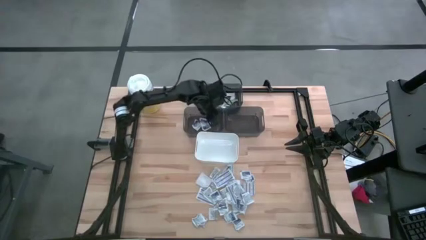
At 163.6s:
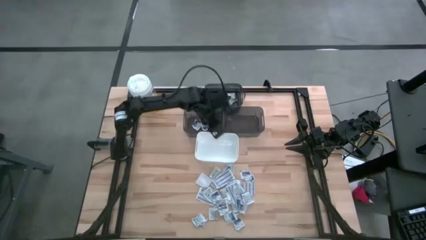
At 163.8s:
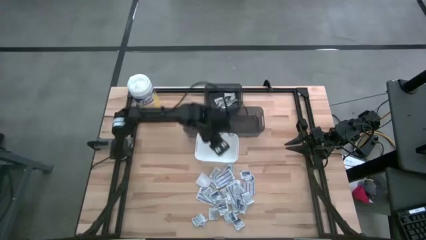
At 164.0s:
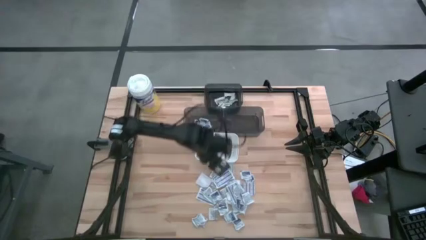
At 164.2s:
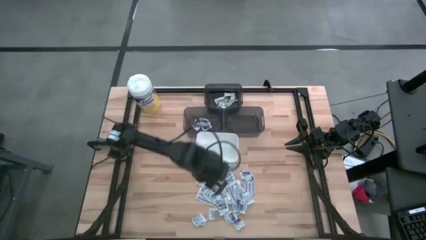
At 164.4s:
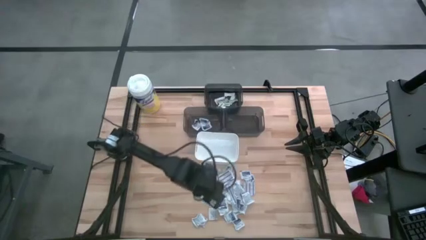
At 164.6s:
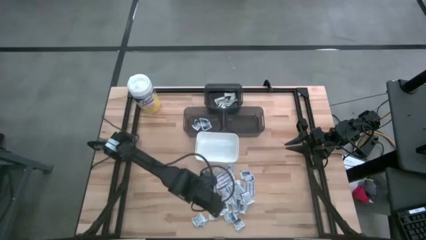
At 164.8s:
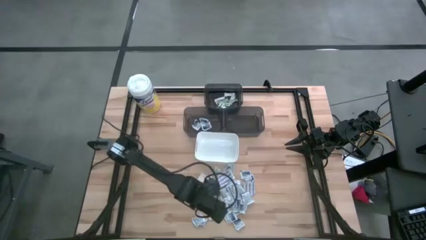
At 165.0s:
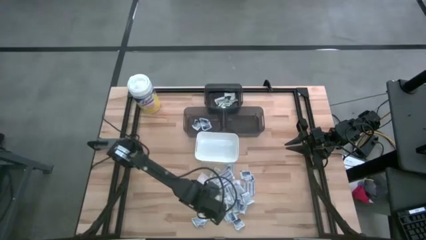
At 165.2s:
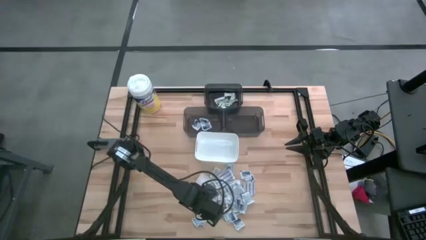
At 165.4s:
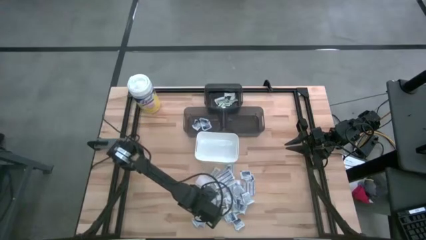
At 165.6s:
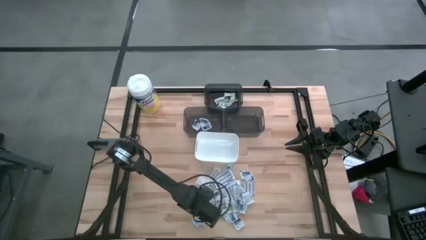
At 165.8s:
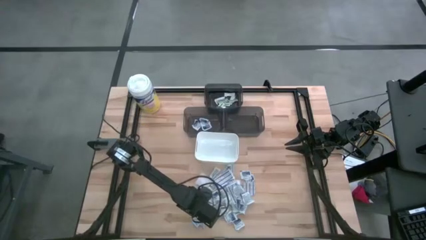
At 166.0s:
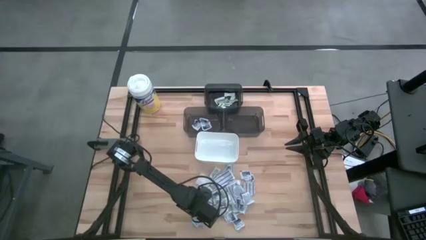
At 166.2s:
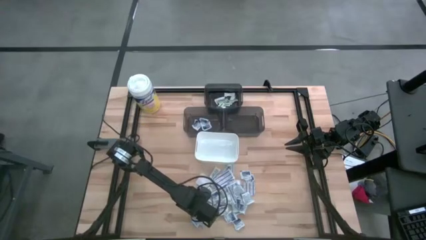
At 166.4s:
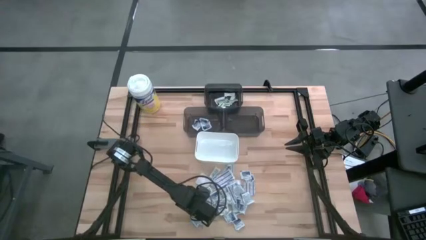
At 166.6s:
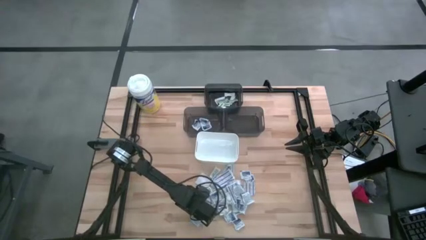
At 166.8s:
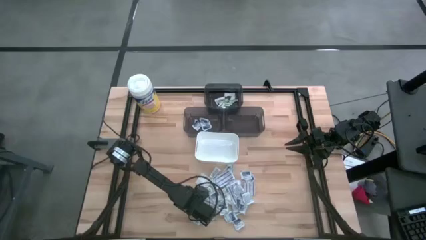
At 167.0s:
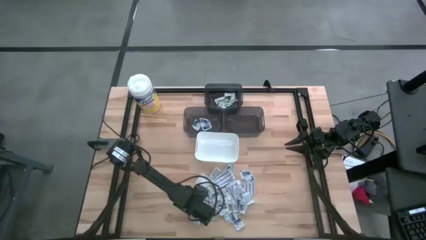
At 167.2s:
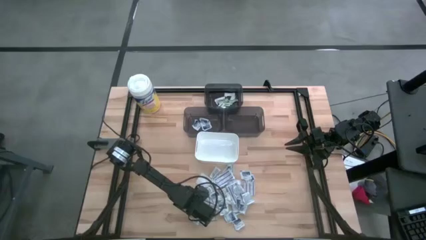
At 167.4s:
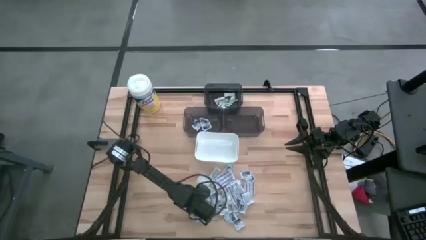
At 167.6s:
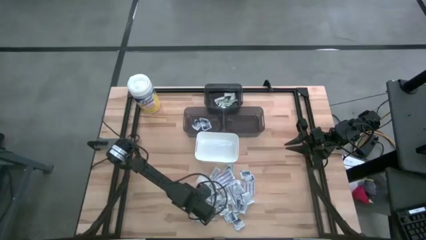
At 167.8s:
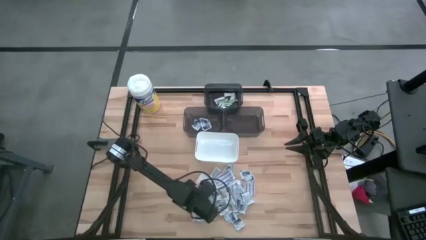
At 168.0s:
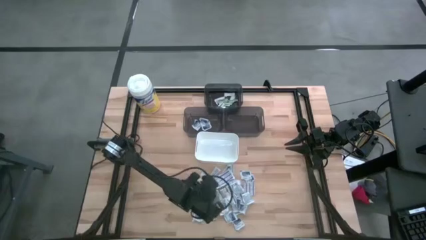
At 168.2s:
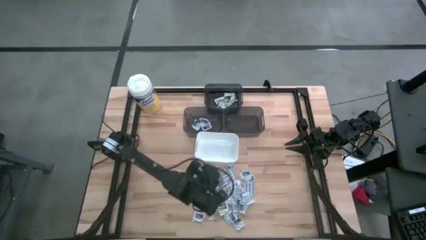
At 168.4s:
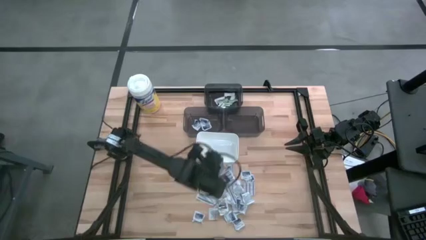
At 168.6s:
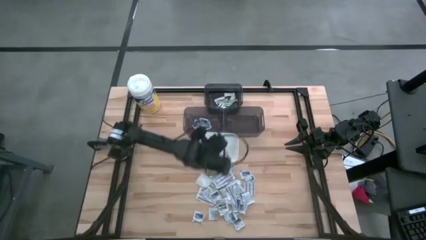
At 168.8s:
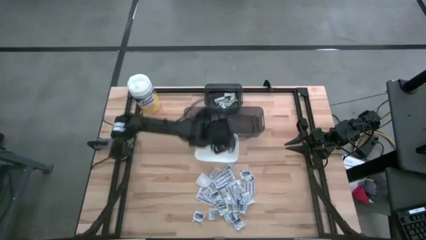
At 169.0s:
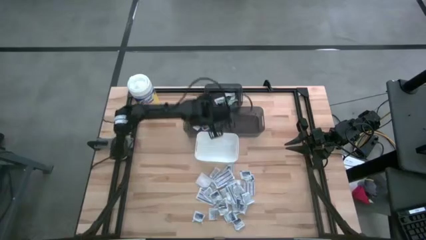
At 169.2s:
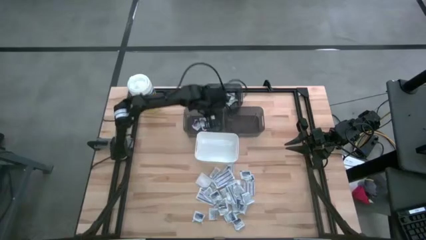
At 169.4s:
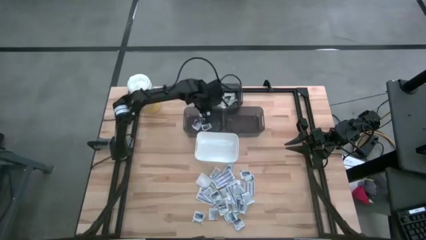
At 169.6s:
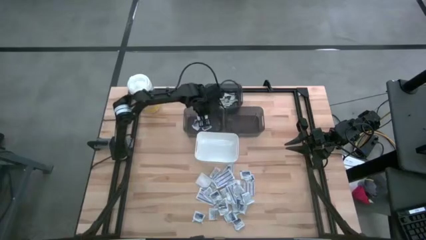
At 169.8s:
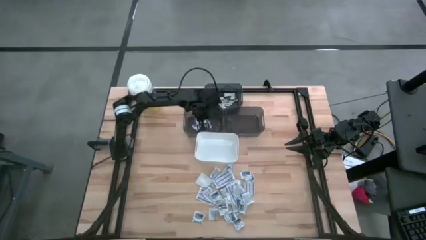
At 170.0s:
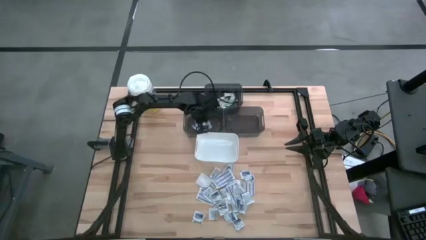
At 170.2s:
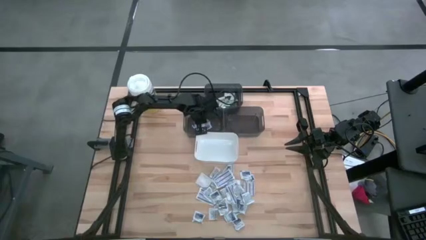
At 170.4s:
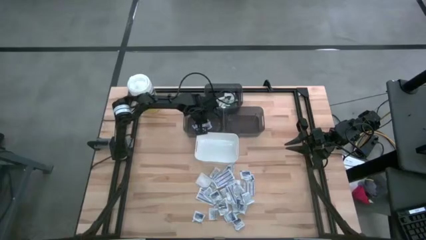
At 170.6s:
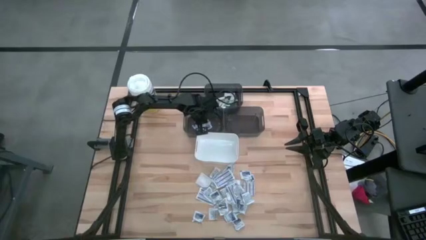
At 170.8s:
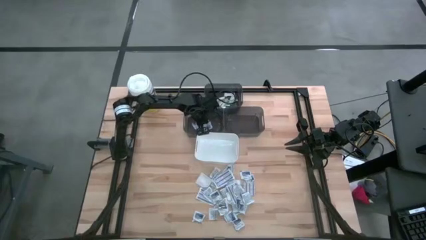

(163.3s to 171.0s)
Task: Pick & Place First Aid Supplies
Put the alcohol pad into the left black bin

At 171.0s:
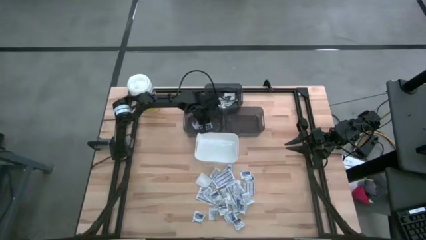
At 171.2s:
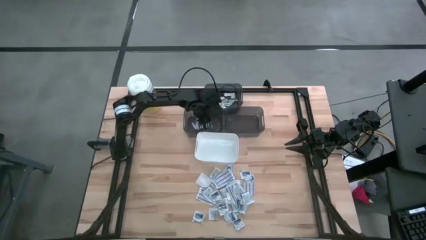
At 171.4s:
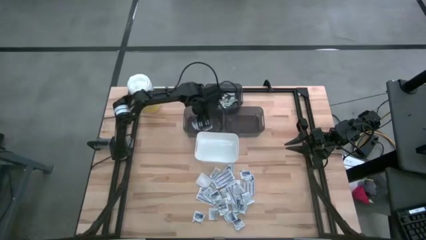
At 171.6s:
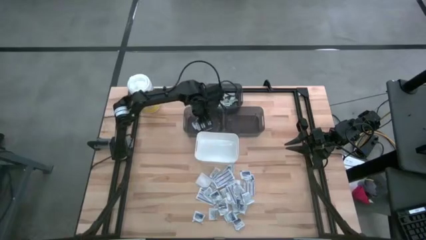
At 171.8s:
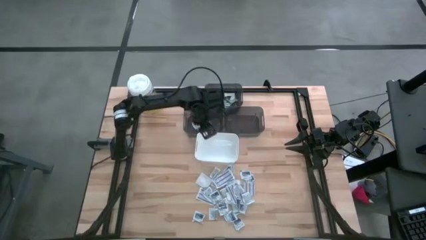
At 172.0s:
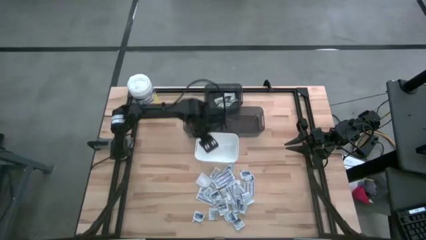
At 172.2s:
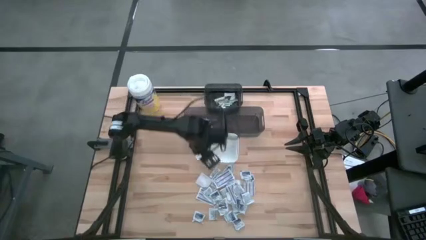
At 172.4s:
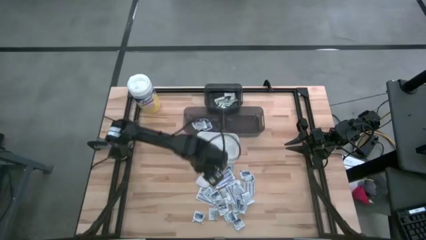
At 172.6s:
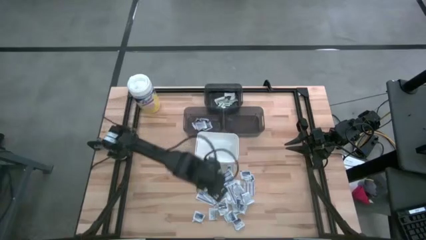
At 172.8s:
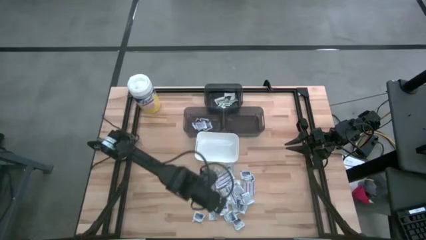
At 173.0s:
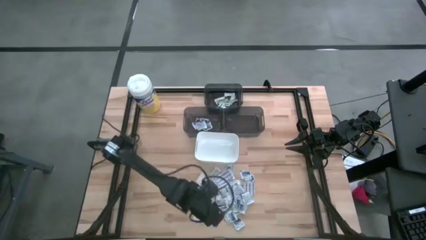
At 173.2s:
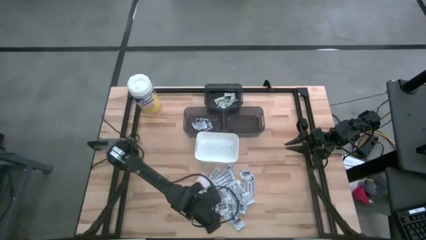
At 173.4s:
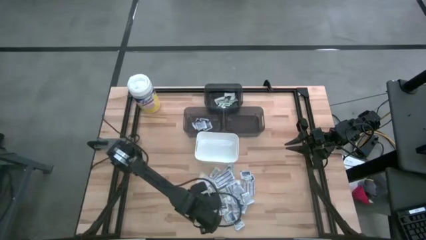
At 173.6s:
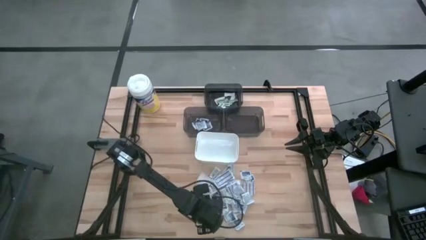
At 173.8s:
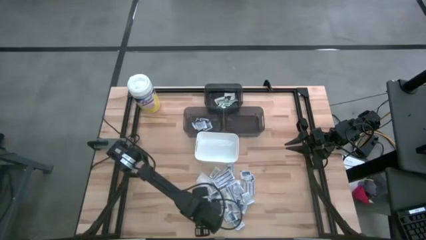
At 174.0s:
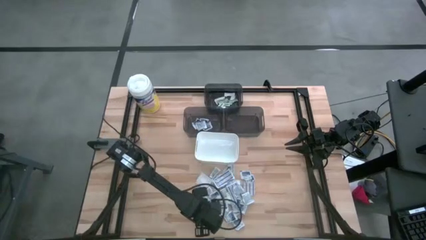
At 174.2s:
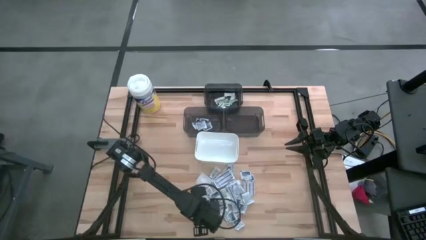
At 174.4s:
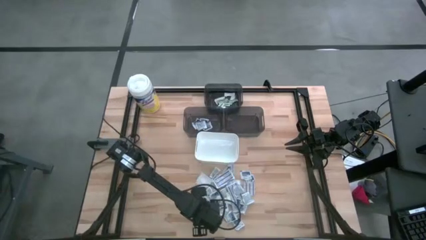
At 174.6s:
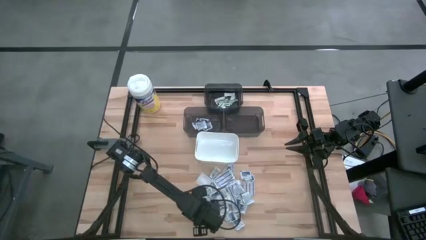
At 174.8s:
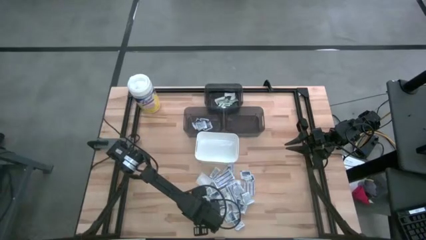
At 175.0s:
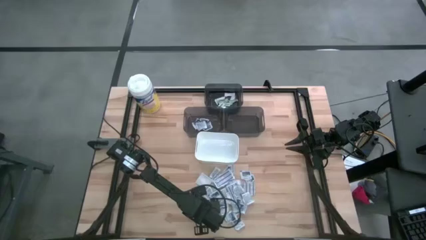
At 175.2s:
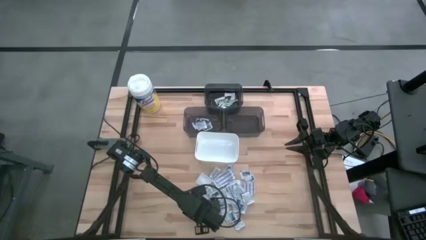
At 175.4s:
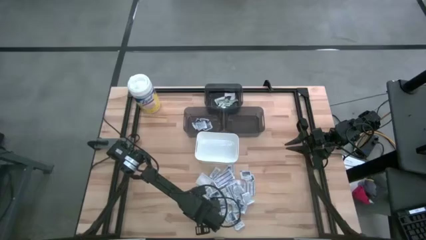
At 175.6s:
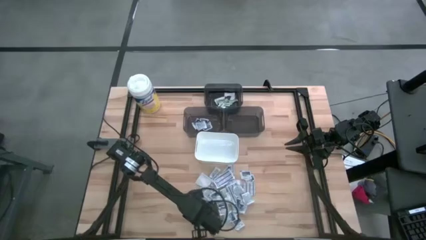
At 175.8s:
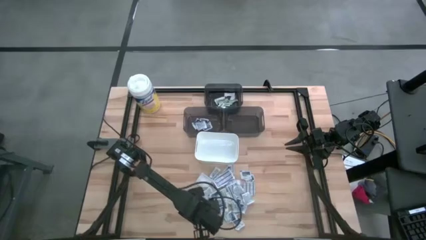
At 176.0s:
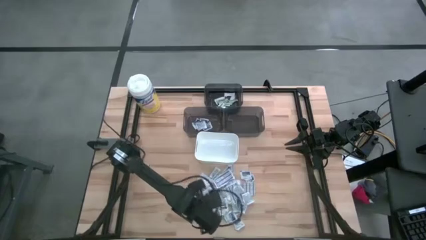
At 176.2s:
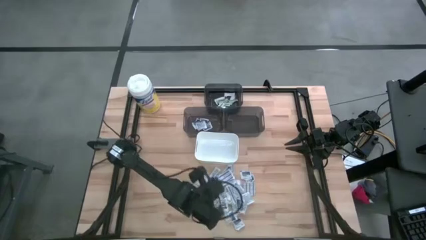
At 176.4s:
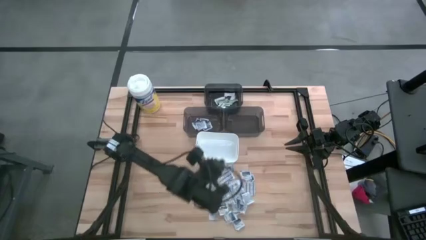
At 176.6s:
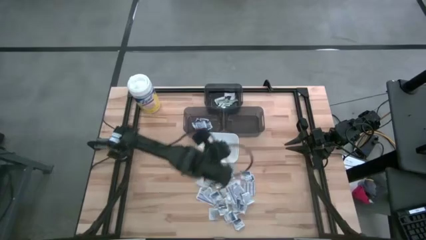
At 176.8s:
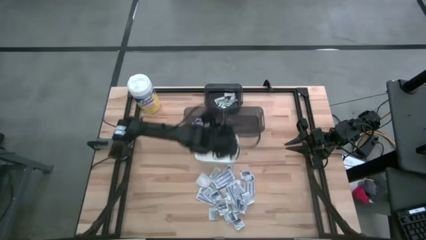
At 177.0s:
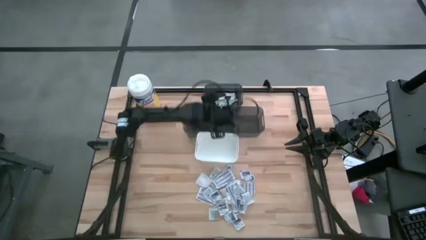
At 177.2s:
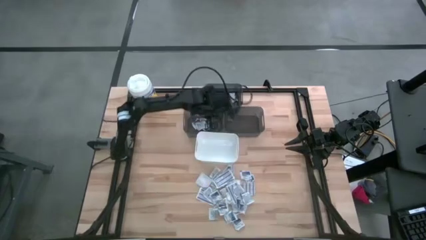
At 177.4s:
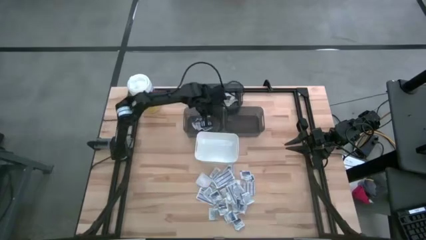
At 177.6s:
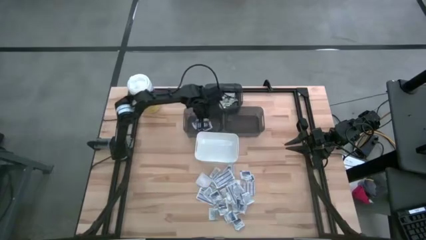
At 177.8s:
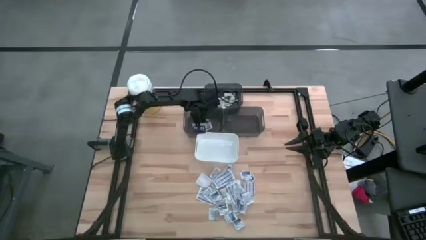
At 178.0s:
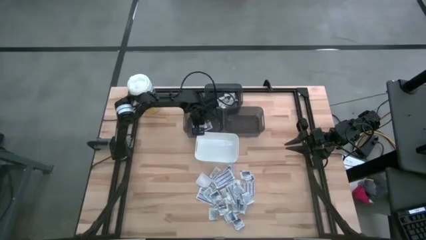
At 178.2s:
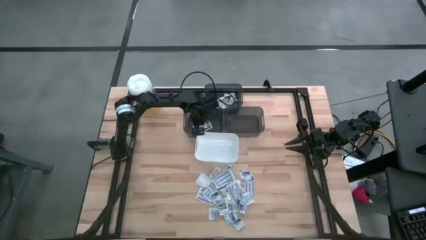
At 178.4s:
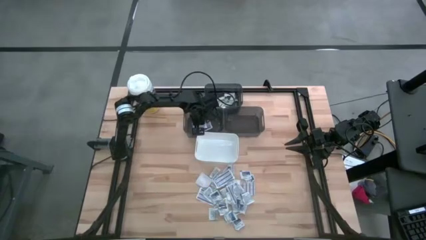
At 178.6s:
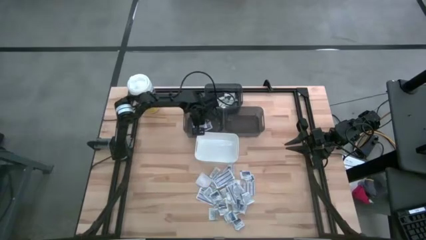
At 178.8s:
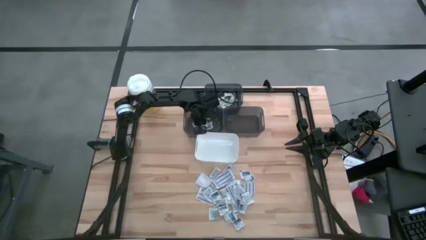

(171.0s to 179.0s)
Put the alcohol pad into the left black bin

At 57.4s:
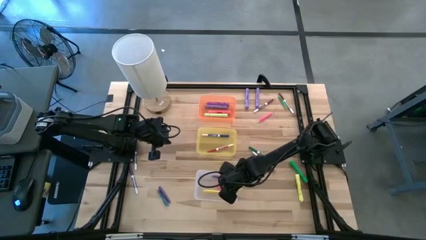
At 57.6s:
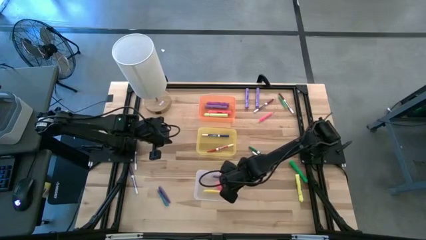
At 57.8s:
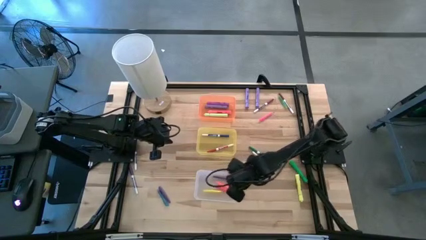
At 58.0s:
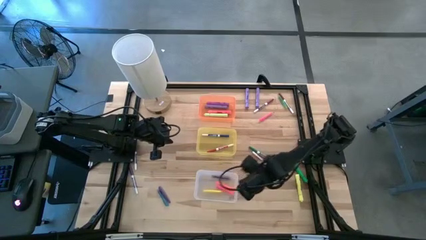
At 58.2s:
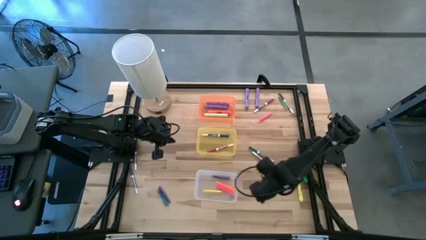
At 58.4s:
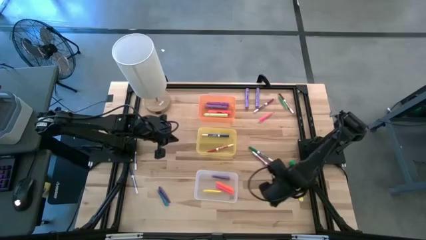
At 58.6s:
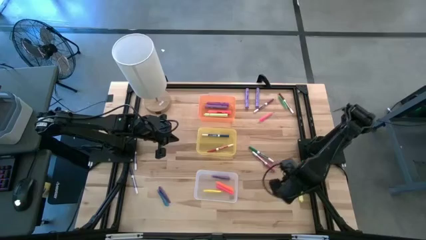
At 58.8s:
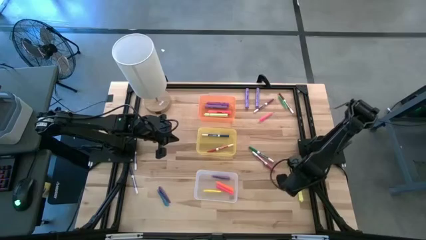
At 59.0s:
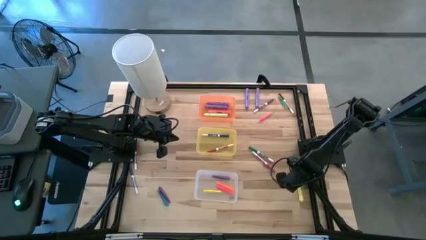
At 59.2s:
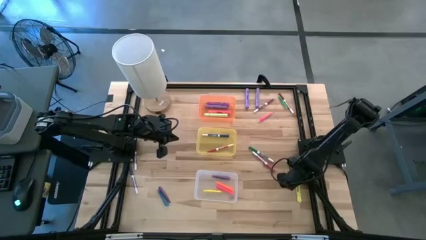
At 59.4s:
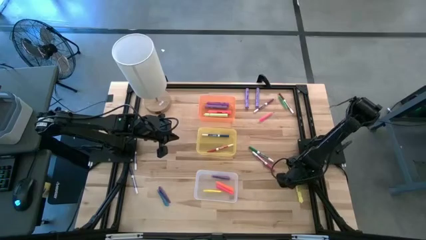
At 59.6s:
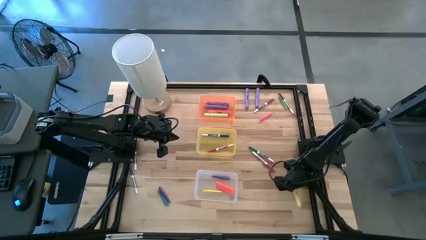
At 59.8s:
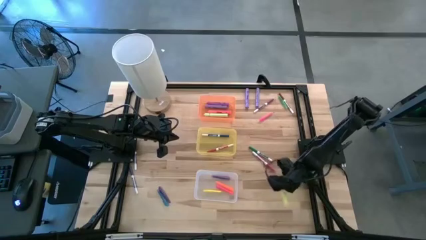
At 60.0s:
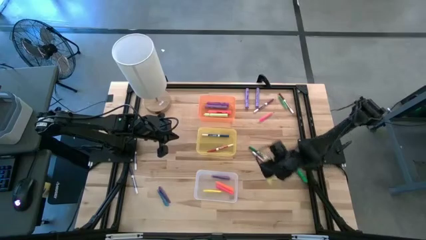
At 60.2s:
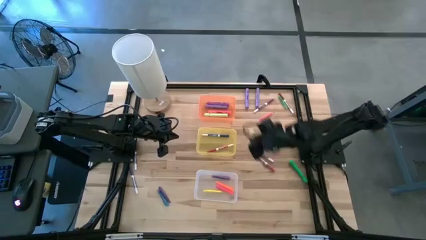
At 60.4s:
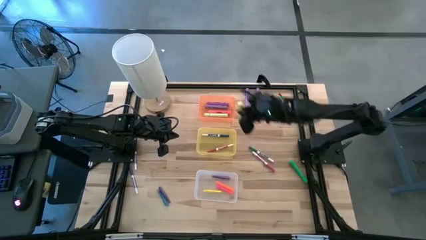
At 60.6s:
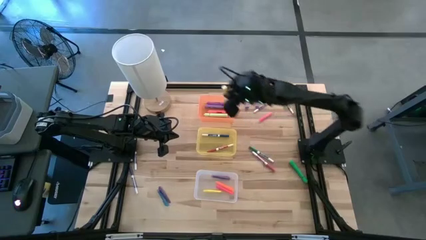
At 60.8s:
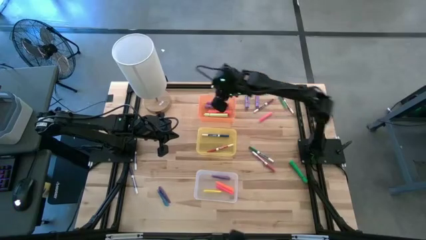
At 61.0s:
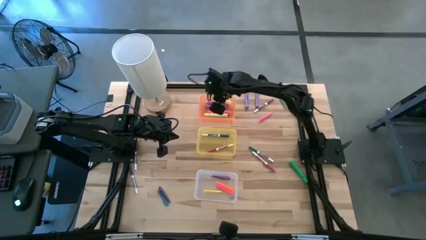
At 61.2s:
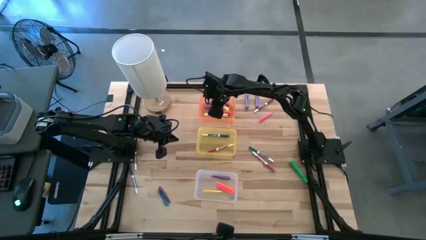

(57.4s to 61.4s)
Task: Pick & Place Markers
Put the yellow highlighter pen into the orange bin
